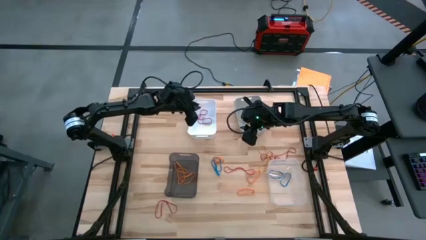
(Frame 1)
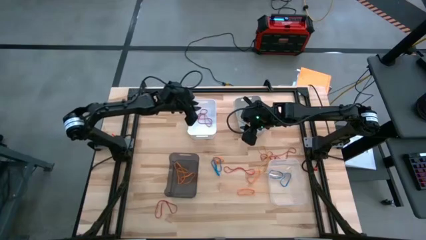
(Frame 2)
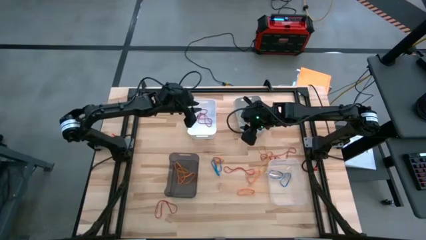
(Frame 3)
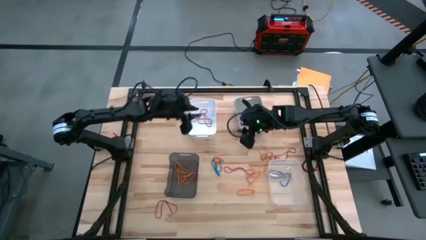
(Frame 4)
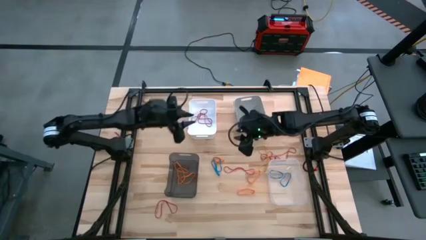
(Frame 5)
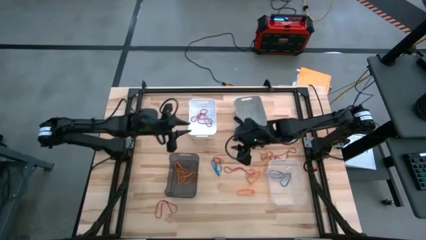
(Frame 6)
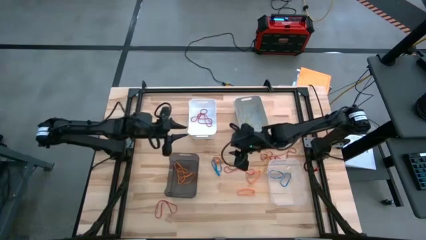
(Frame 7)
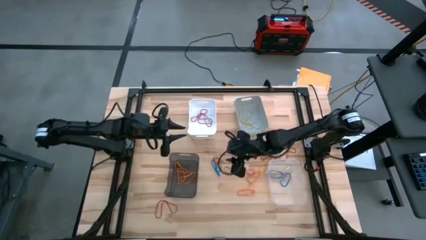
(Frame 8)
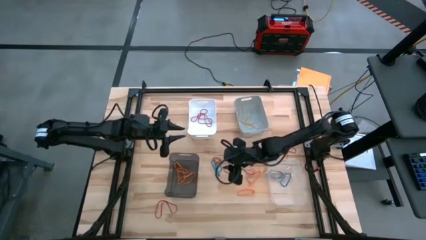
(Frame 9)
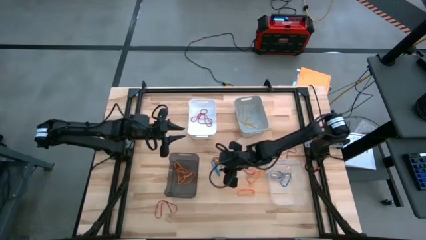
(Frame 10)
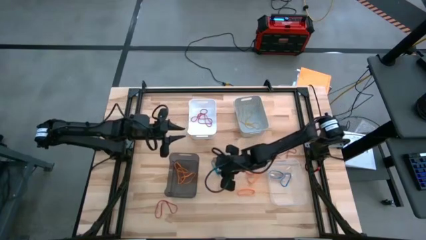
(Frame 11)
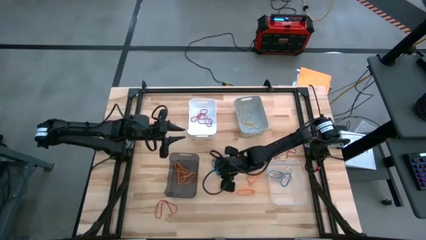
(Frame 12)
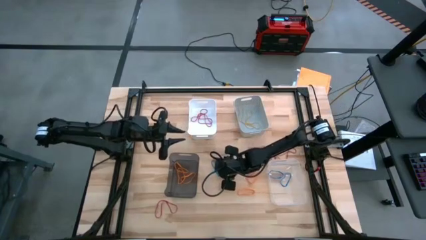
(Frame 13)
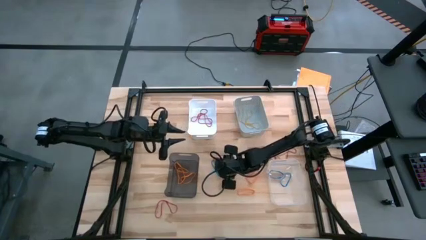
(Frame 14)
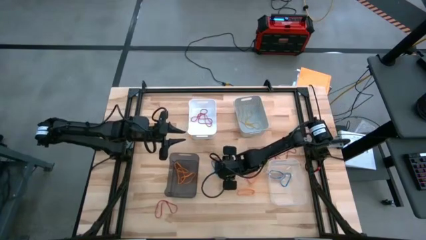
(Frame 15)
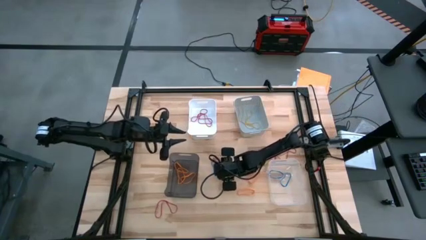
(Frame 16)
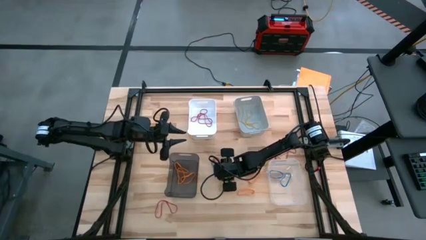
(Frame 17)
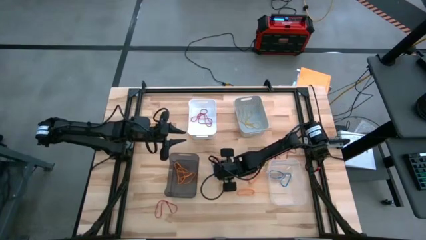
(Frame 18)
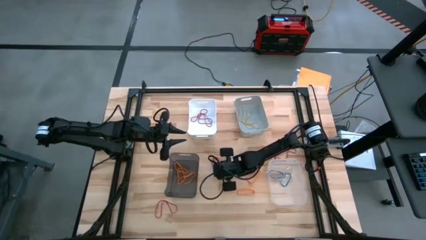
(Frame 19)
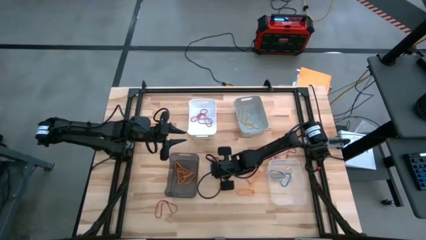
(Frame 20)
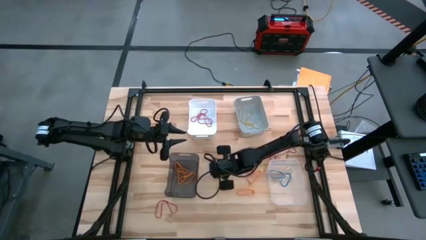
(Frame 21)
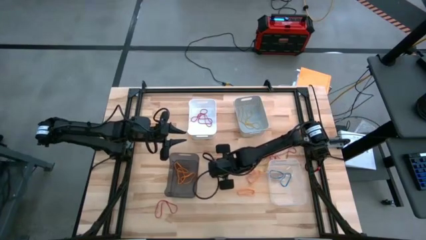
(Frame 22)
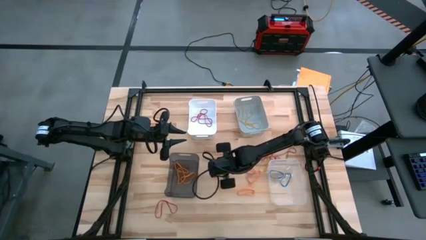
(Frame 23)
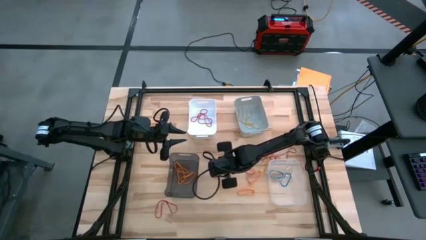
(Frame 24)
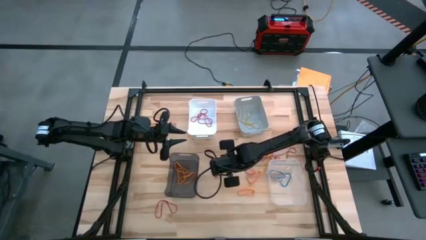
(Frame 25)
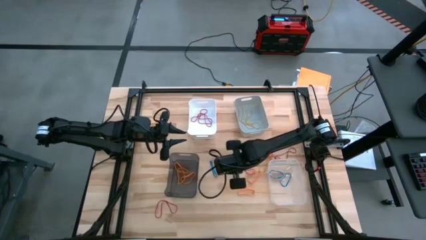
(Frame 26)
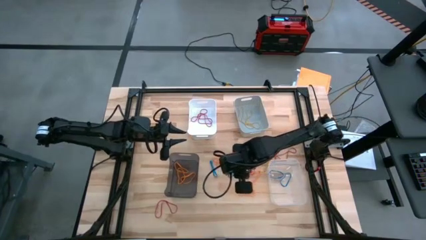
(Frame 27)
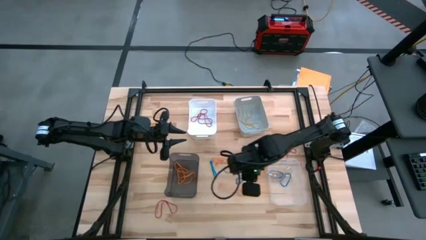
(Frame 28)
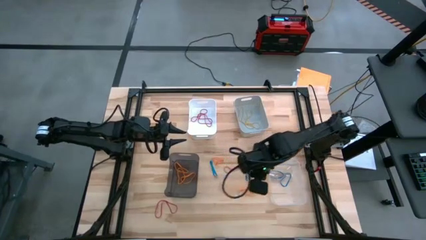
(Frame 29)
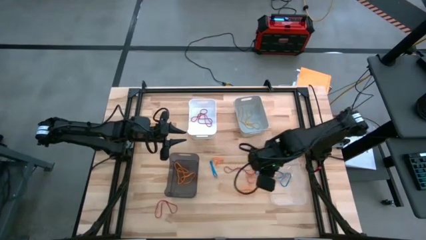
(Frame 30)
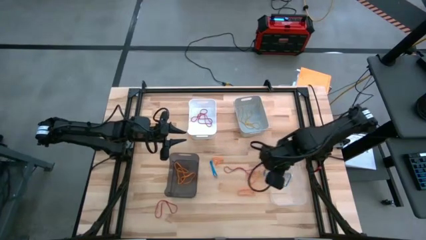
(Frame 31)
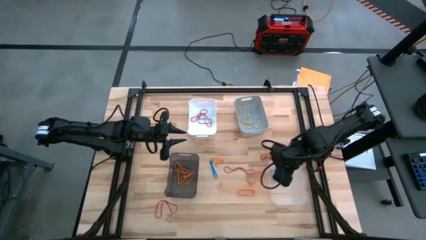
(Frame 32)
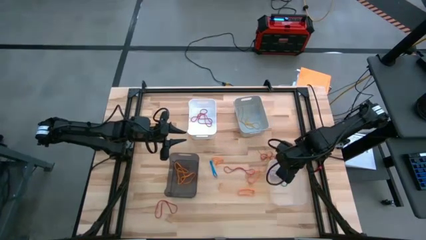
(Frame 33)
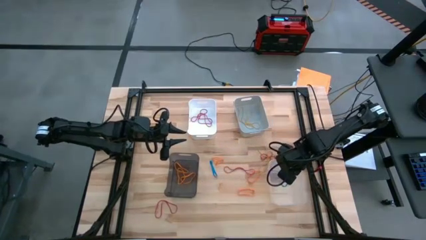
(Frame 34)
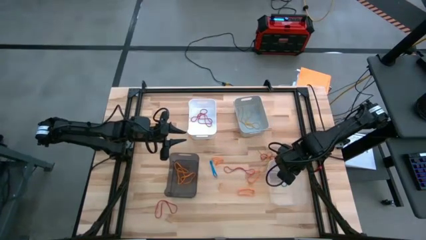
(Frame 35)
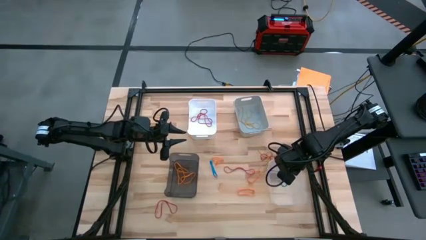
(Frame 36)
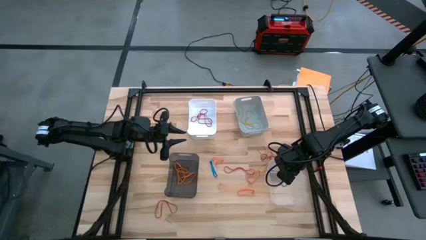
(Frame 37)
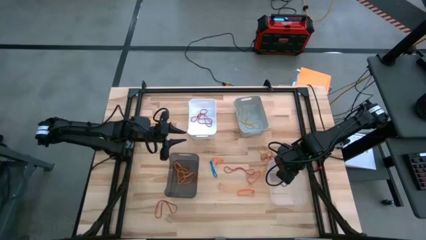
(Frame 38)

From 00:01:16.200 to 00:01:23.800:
Task: Sort rubber bands into baskets
Put the blue rubber band into the transparent bin

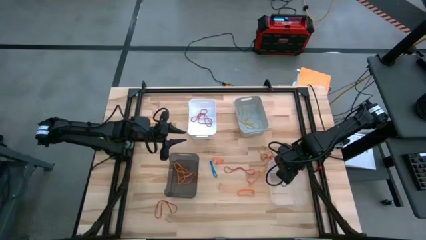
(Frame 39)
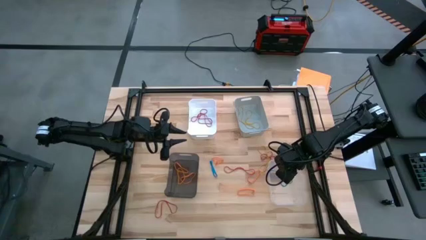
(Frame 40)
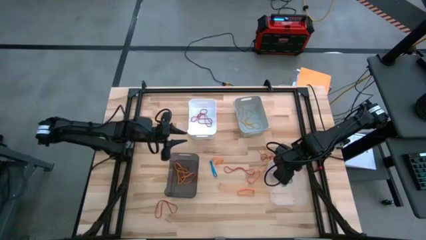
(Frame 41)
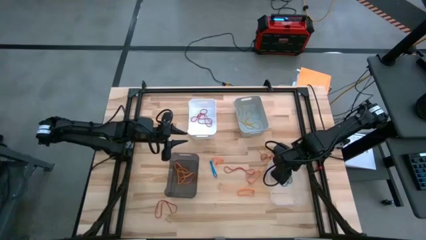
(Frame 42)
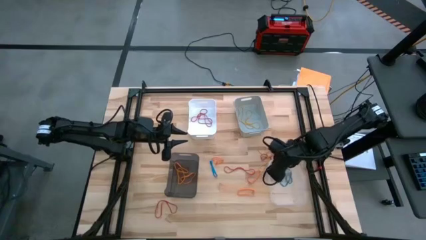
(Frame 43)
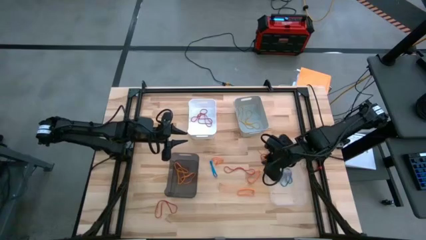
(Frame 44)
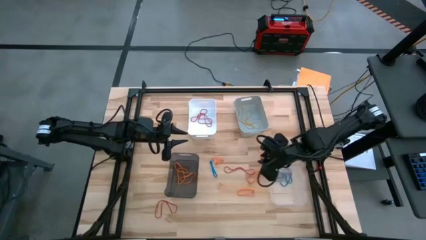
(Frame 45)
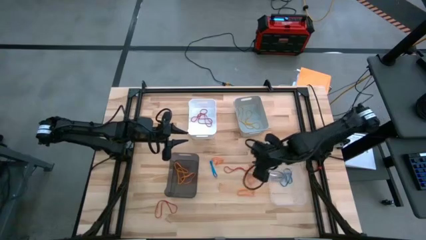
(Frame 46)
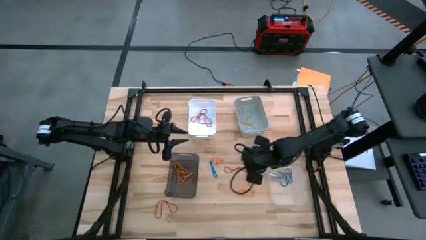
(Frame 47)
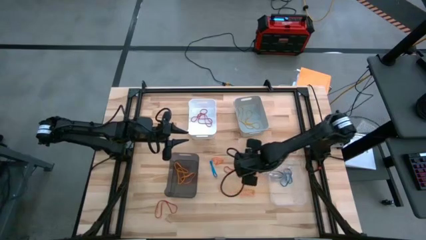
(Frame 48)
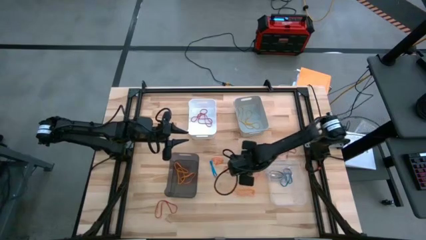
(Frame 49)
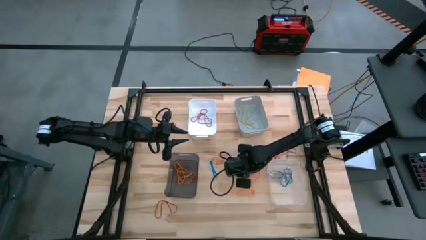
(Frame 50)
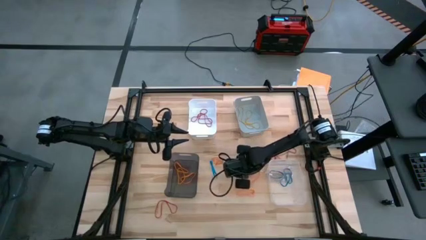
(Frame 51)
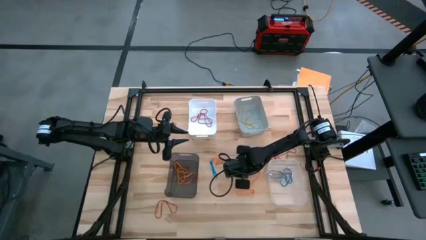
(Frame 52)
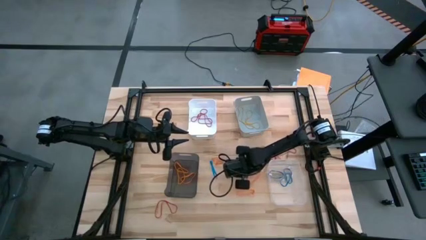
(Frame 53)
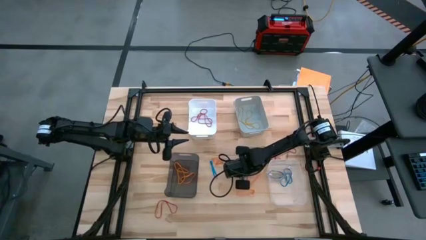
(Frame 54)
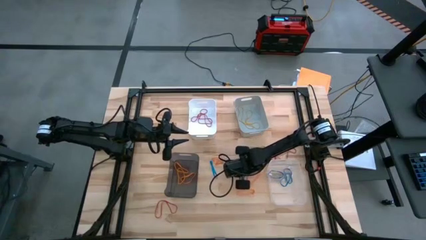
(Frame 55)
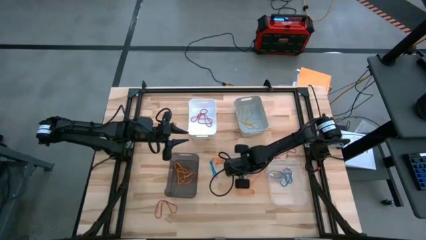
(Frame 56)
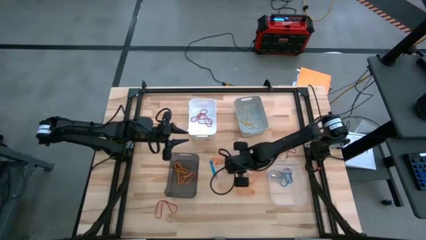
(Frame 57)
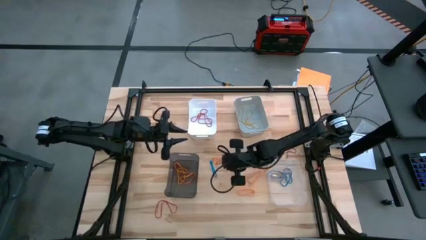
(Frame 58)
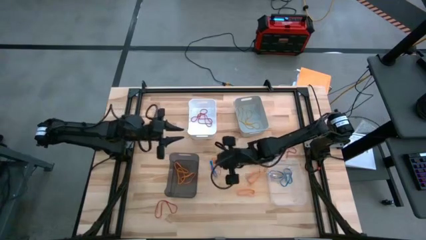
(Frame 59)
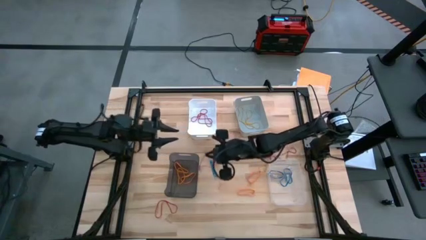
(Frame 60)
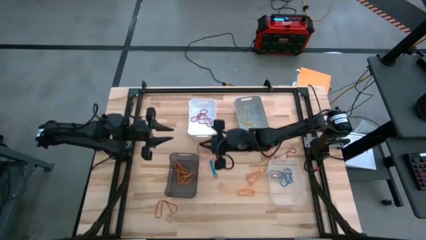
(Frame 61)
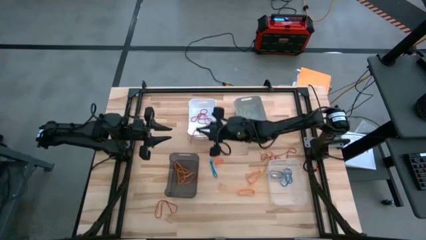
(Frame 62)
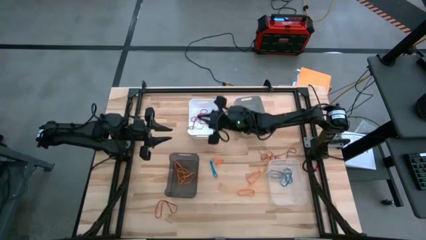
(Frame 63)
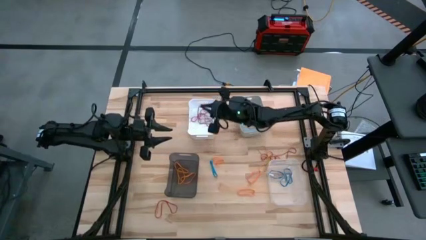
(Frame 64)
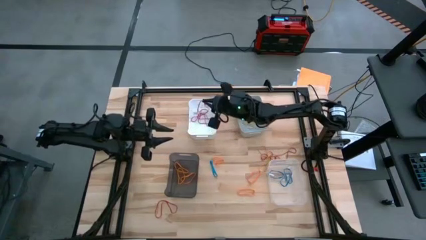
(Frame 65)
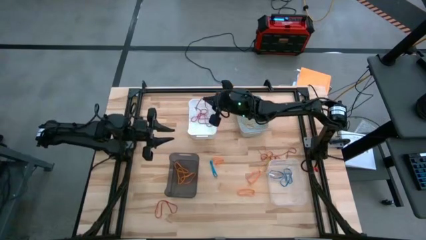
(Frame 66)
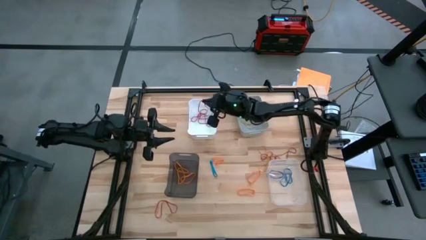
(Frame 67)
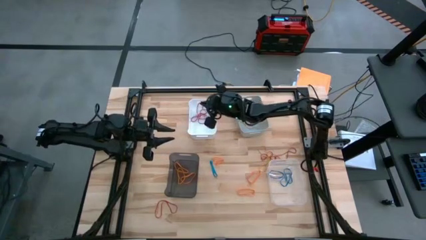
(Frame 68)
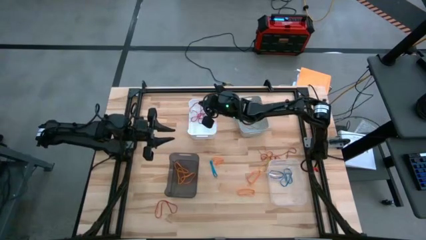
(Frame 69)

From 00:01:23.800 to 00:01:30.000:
Put the red rubber band into the white bin

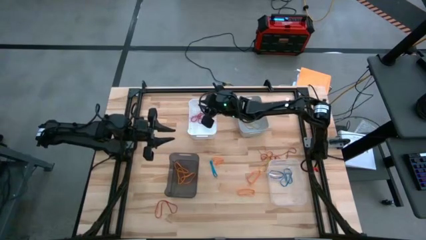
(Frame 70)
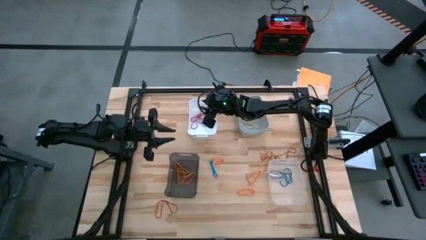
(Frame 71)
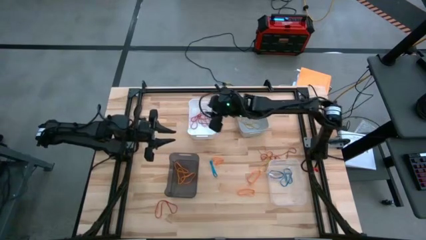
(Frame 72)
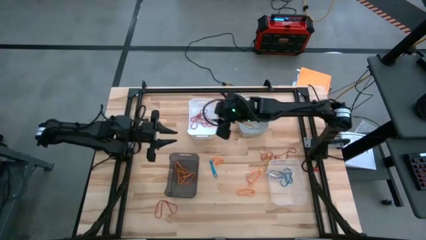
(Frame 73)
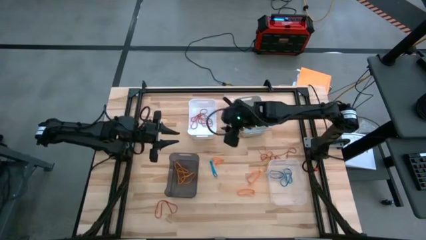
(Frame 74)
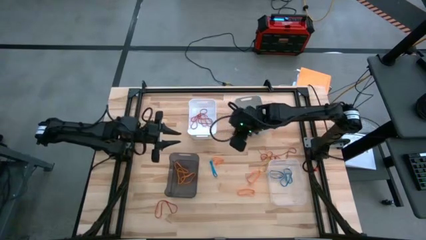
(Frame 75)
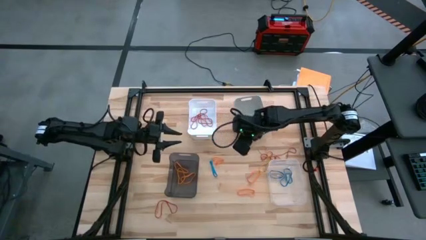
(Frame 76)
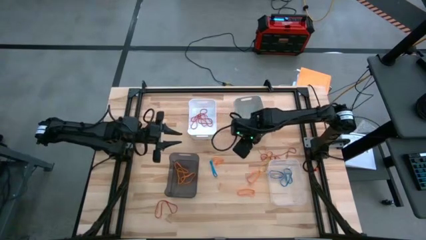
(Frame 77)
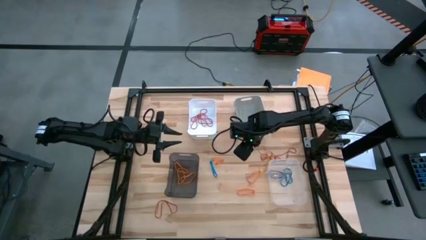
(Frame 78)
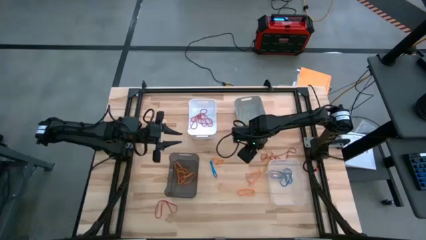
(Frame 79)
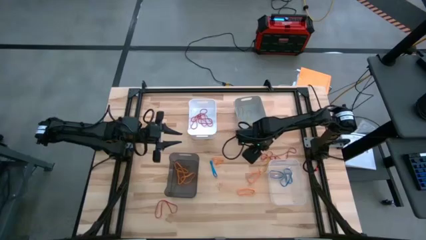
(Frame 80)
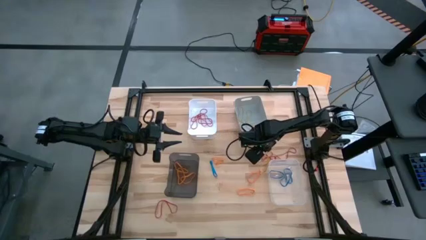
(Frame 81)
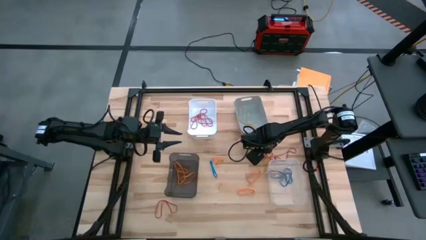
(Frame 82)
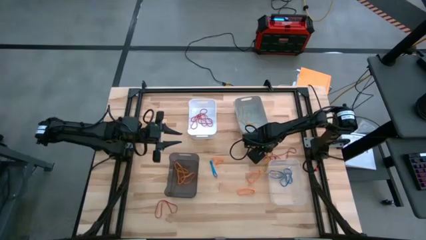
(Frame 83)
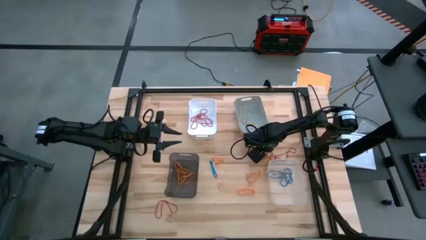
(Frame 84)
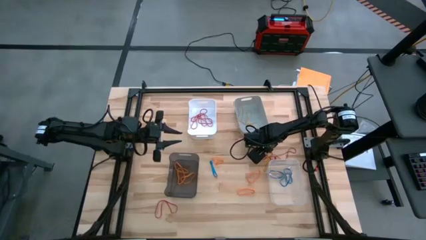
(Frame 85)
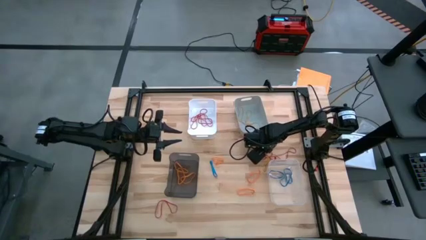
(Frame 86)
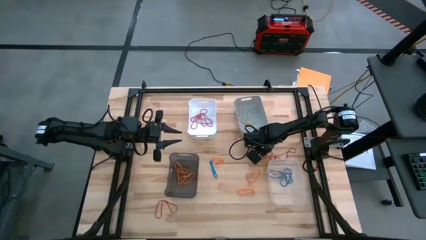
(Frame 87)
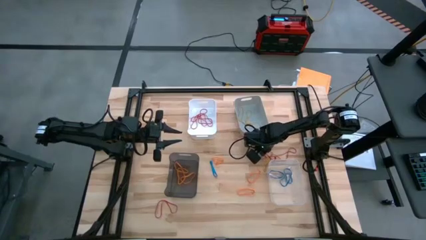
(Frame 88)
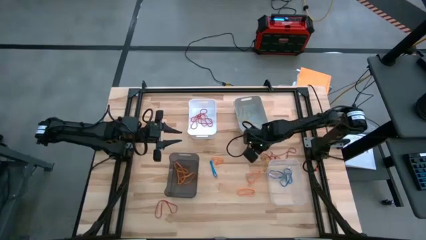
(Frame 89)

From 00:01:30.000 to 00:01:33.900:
Put the yellow rubber band into the gray bin
